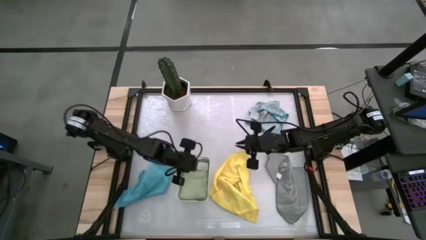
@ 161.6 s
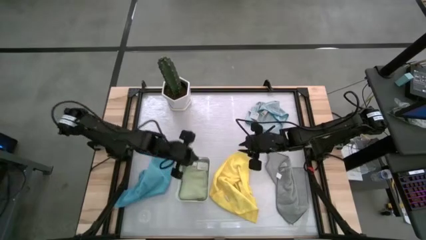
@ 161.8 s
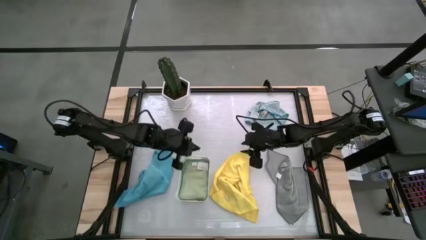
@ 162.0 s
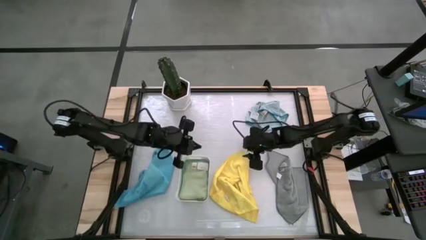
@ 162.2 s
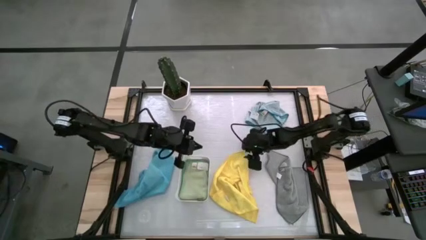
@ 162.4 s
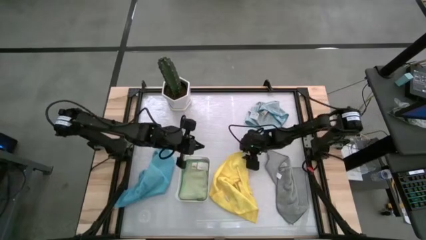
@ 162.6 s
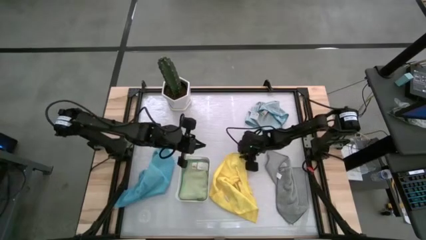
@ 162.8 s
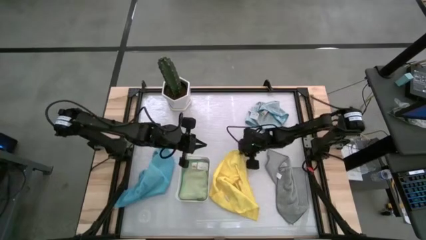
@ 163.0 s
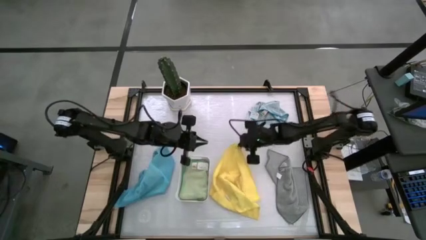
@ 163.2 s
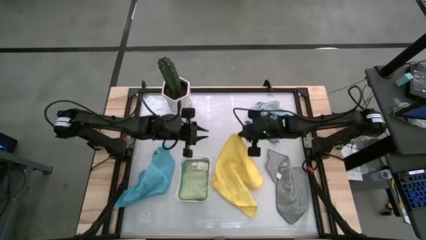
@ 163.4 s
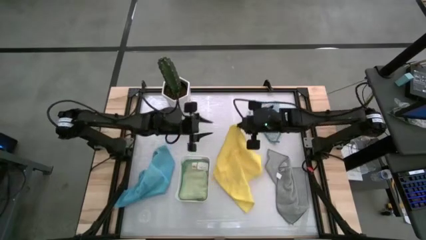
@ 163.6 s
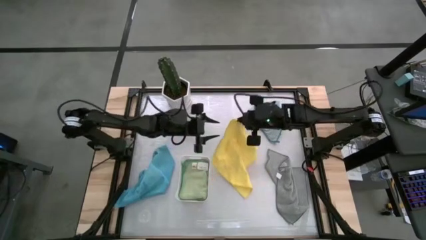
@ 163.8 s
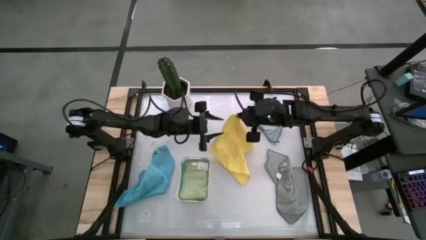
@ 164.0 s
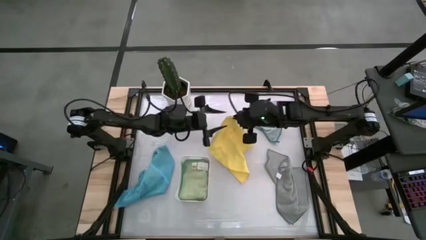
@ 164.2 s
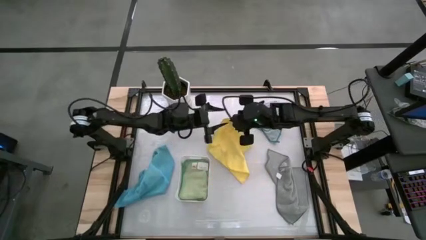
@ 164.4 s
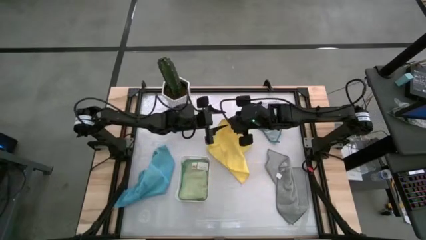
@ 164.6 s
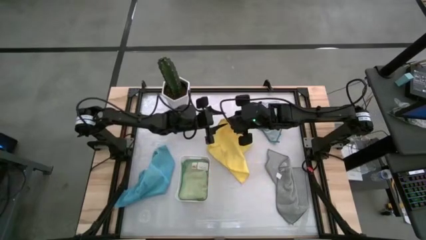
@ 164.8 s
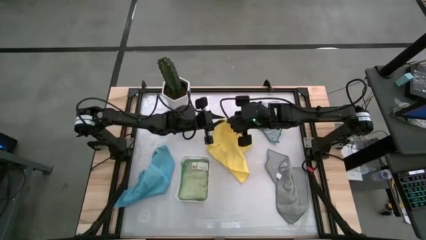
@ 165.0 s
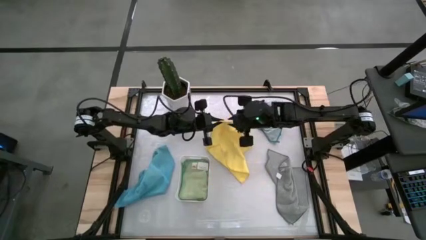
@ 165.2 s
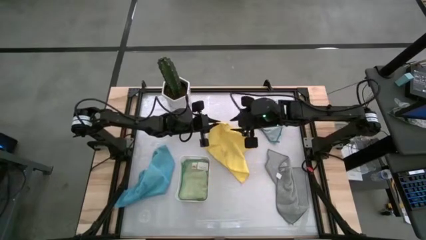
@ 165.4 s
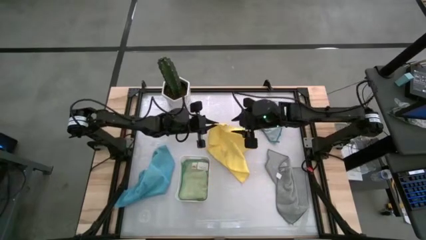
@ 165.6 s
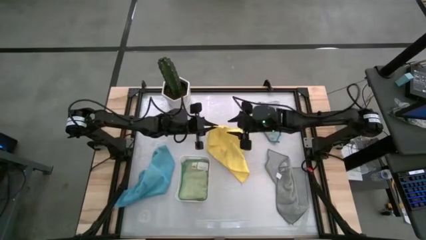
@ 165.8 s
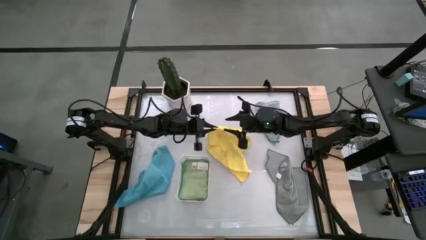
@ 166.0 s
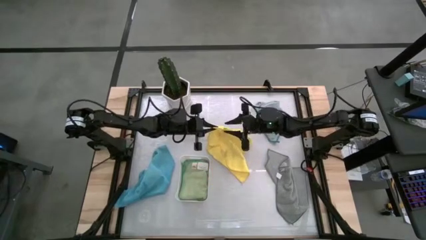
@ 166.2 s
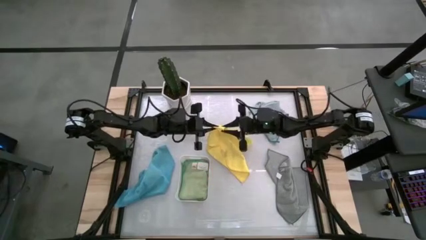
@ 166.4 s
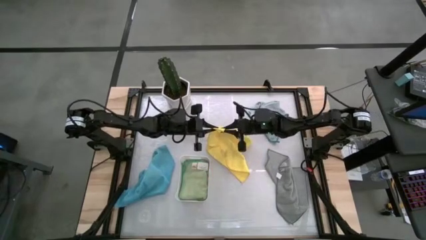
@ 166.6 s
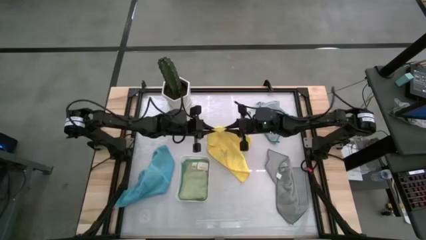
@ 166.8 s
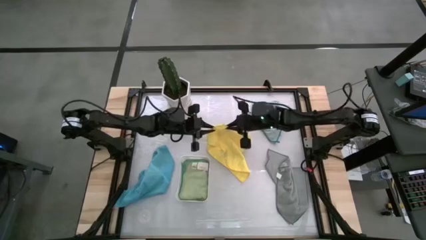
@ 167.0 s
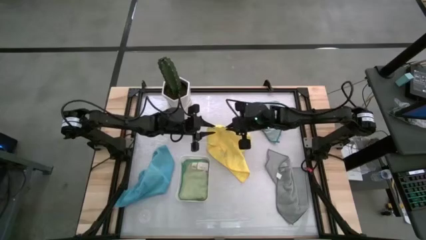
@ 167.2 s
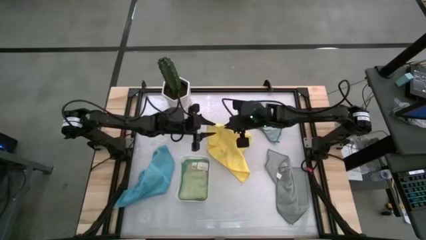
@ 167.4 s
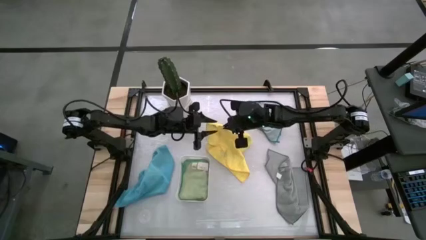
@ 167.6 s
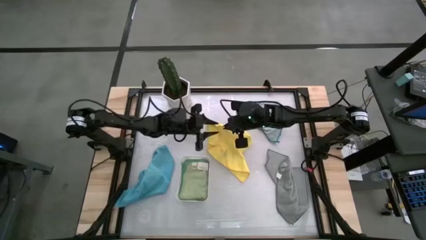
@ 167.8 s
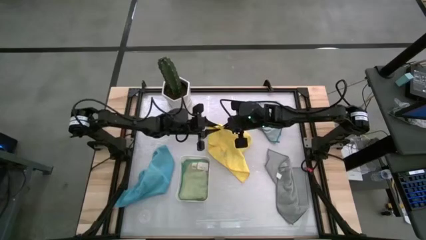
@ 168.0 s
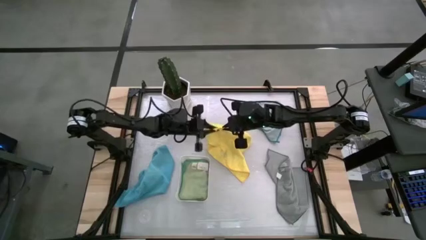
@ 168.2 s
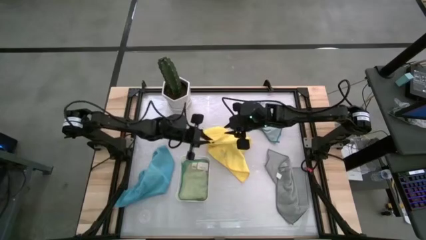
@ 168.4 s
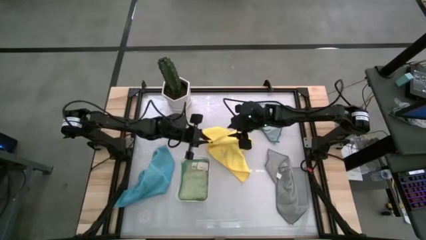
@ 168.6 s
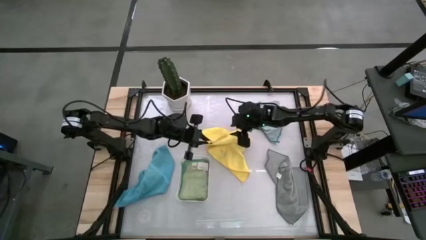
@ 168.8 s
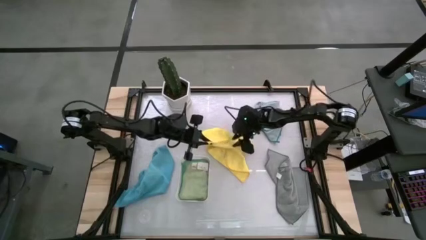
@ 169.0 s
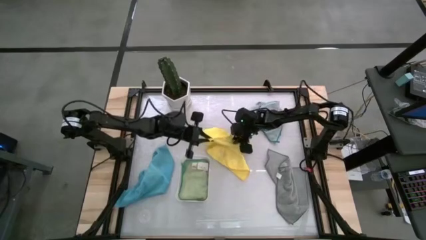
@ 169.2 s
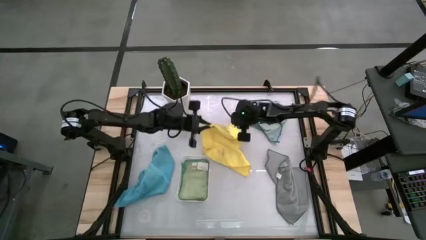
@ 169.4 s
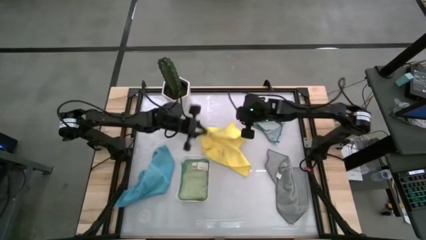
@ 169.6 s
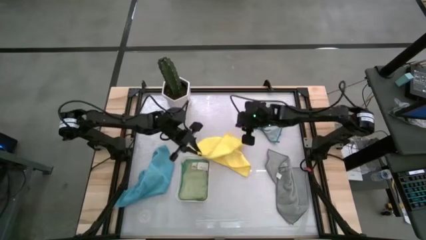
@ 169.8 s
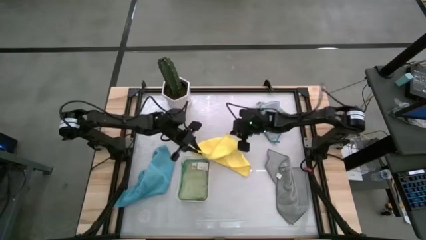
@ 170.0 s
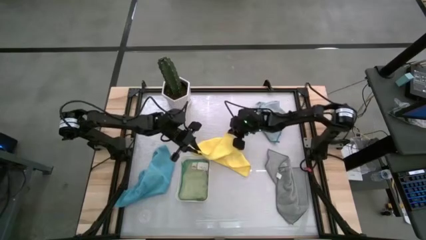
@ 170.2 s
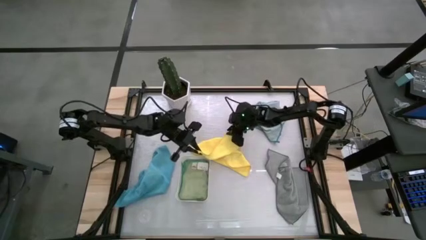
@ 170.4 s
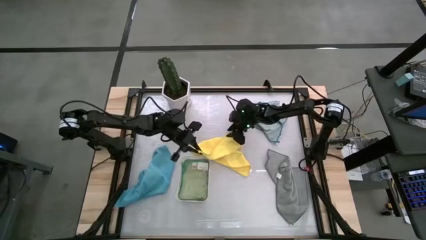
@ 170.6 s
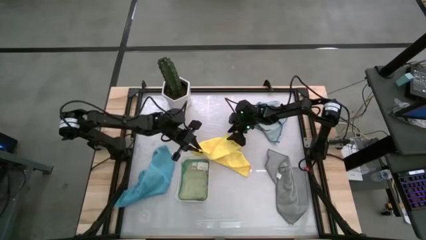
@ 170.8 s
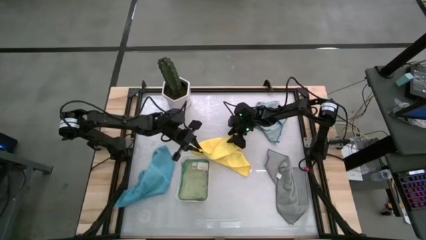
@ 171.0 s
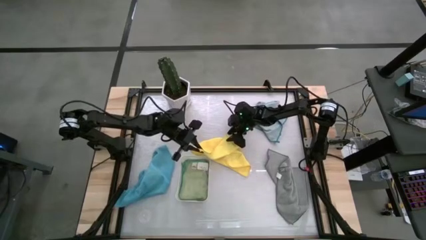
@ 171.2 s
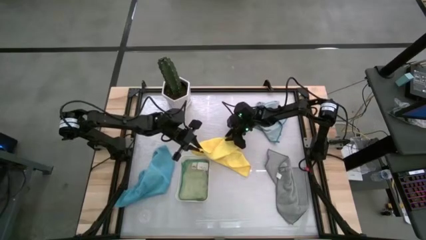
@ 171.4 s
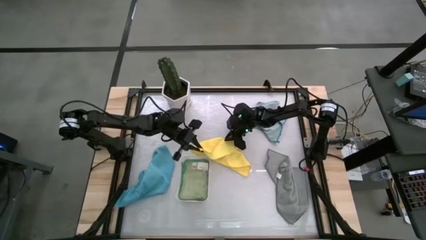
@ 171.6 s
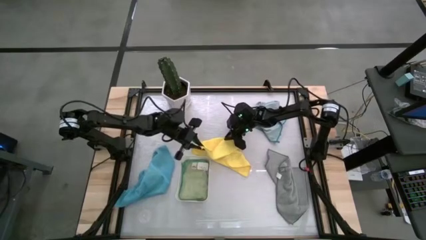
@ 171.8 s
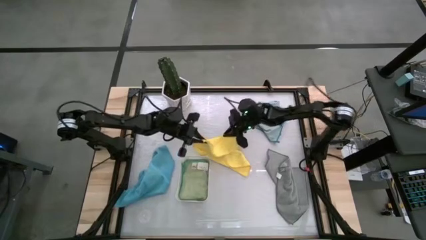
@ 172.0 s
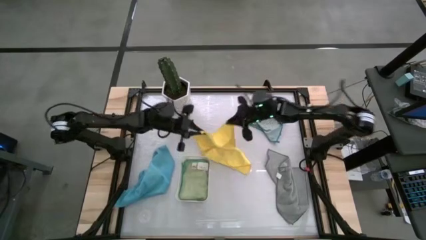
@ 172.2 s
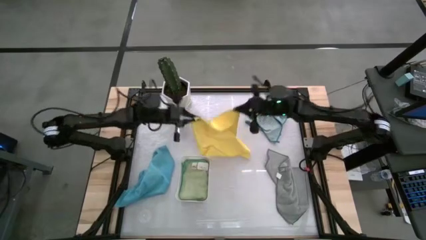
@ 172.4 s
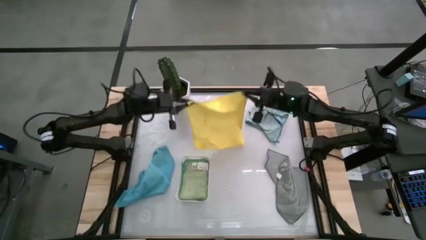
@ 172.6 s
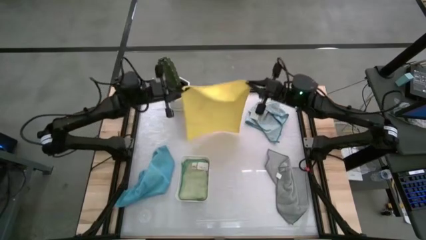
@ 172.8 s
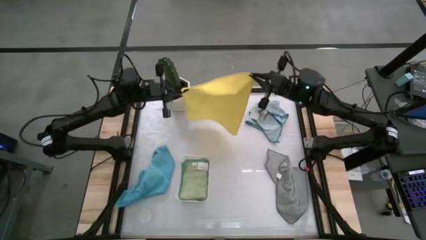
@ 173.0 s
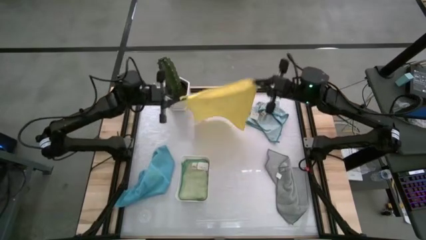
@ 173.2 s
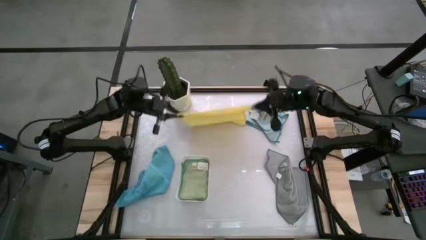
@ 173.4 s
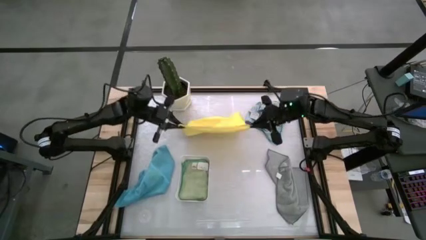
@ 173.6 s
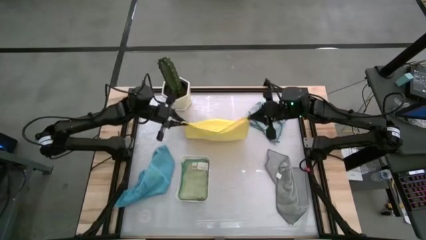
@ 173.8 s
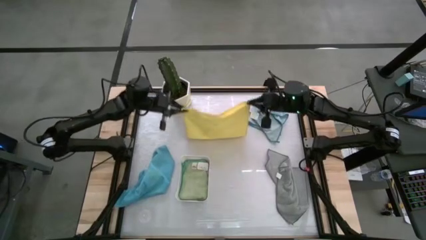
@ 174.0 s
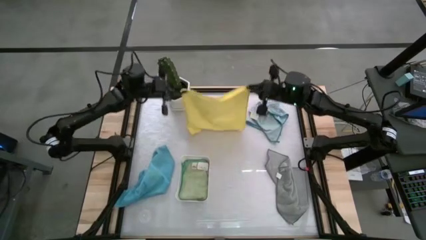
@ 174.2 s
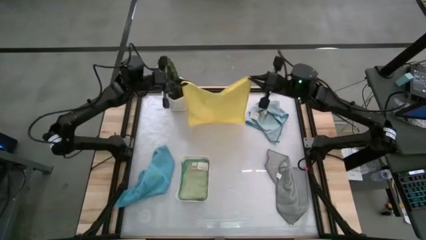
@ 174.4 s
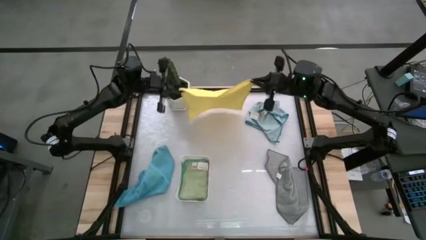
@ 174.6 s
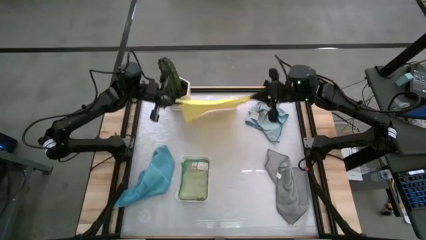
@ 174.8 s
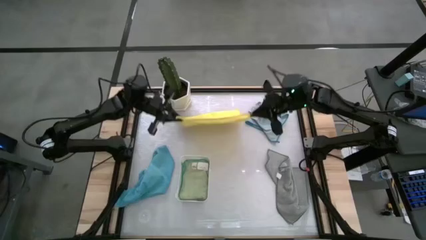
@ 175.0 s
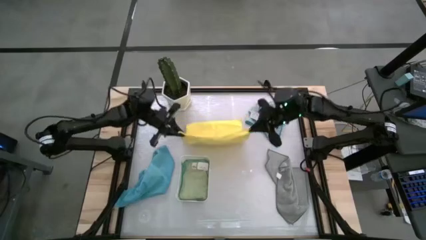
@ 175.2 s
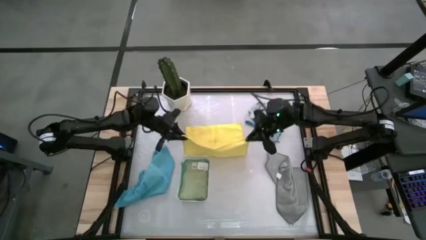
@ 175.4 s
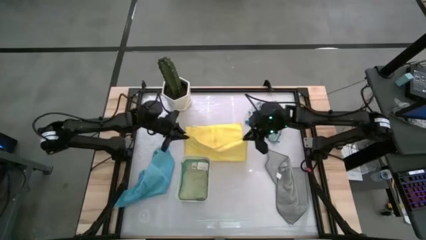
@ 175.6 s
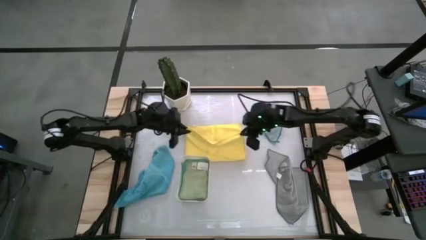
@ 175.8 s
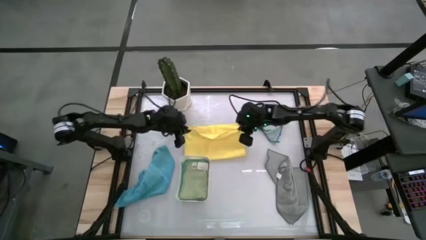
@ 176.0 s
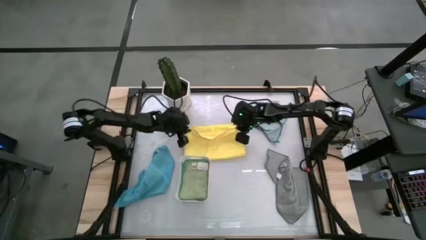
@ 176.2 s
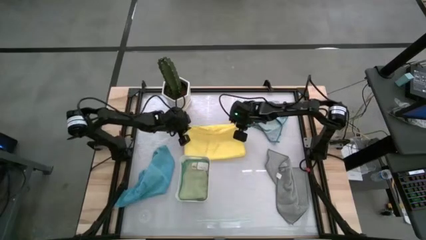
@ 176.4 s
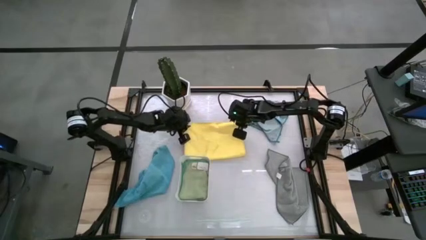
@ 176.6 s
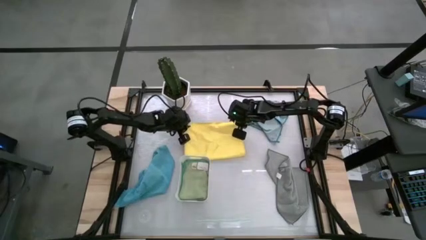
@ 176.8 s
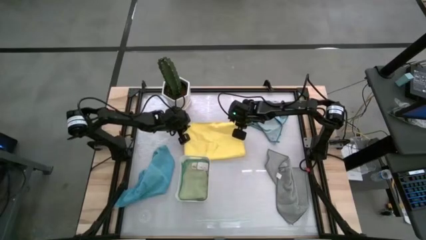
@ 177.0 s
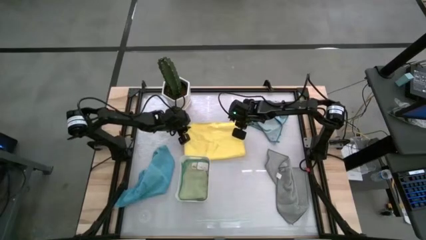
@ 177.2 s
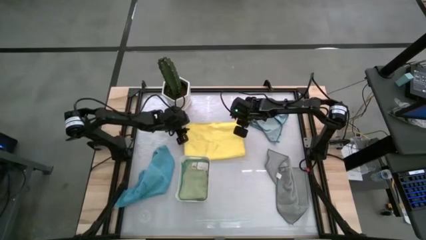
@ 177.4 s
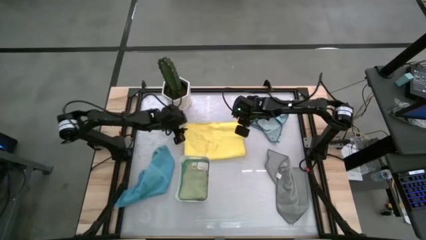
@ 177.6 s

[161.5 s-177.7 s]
Task: Fold microfiber towels
Fold the yellow microfiber towel
